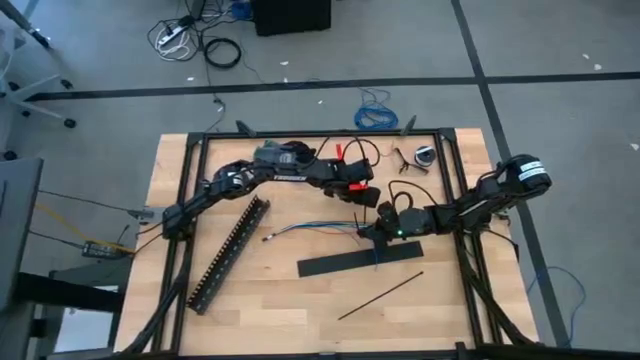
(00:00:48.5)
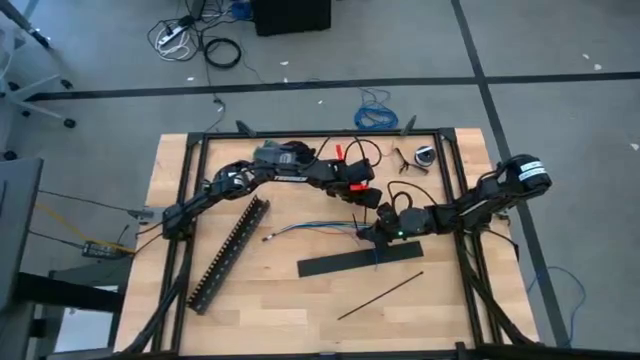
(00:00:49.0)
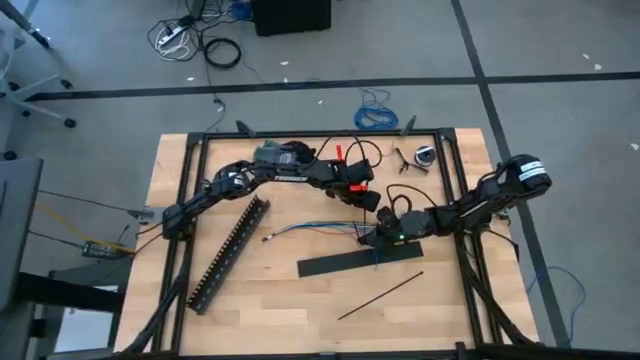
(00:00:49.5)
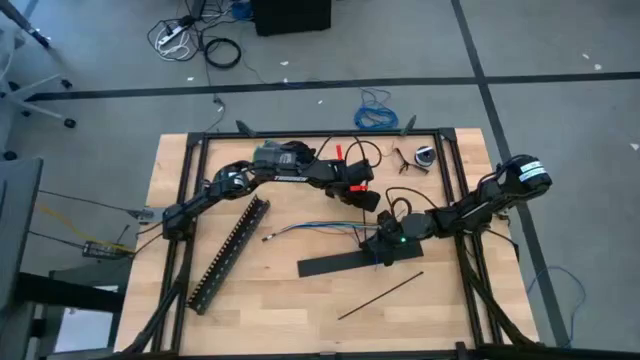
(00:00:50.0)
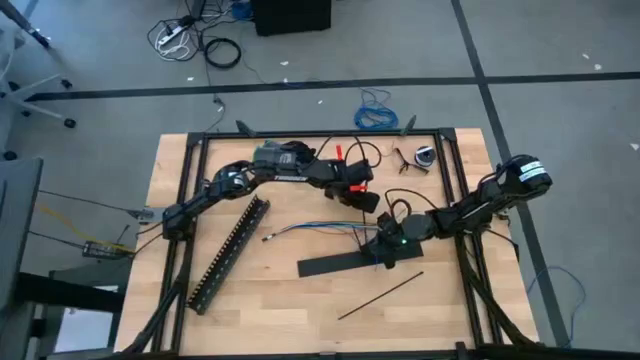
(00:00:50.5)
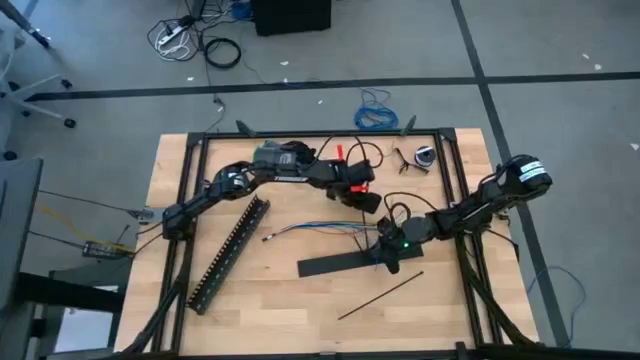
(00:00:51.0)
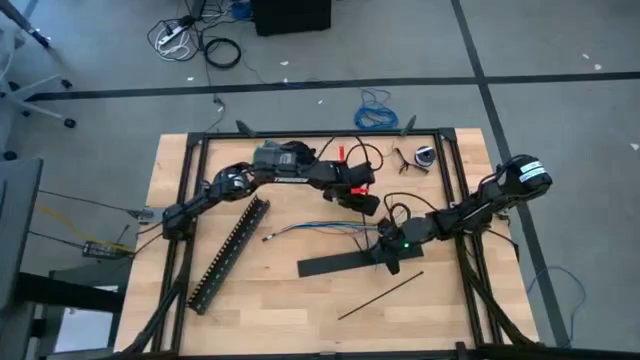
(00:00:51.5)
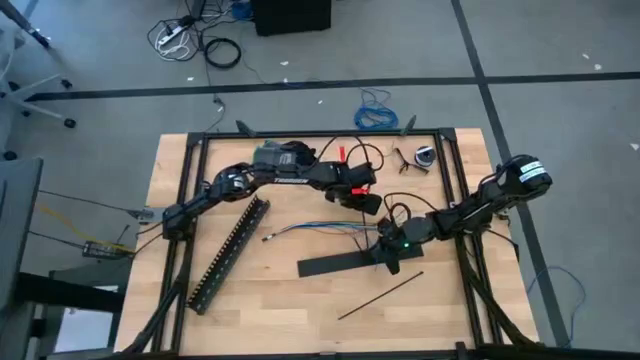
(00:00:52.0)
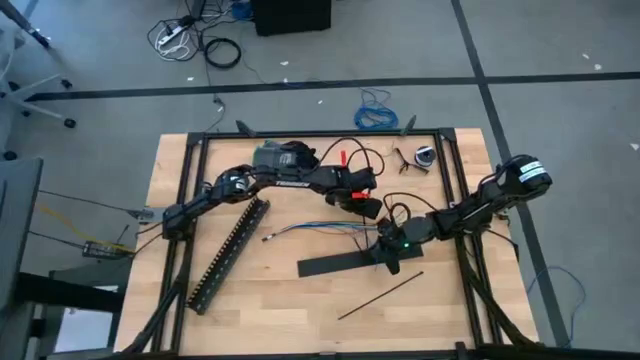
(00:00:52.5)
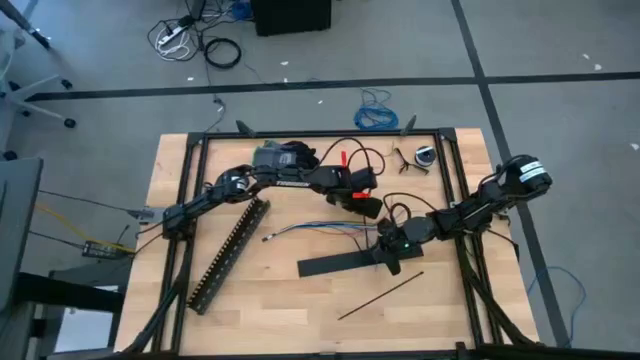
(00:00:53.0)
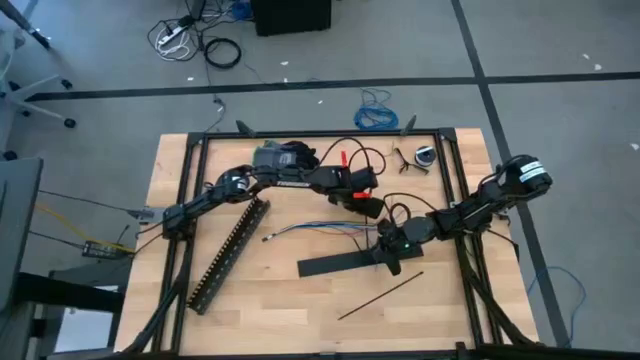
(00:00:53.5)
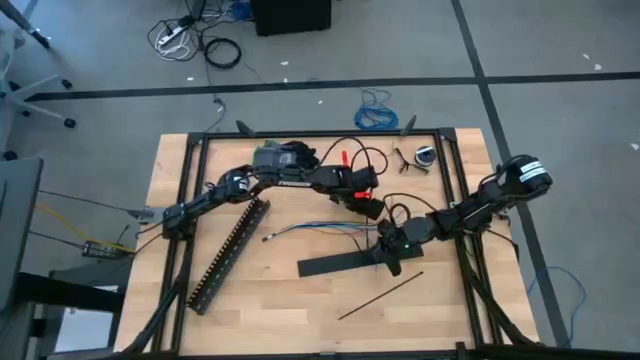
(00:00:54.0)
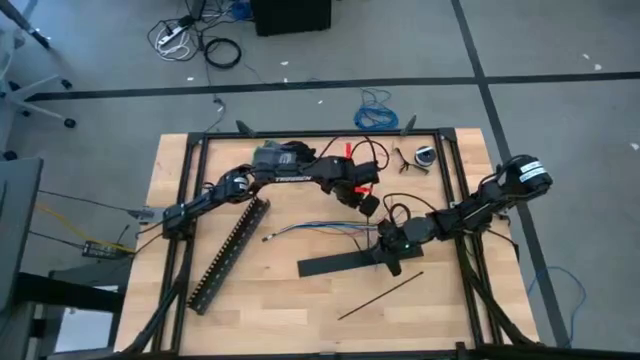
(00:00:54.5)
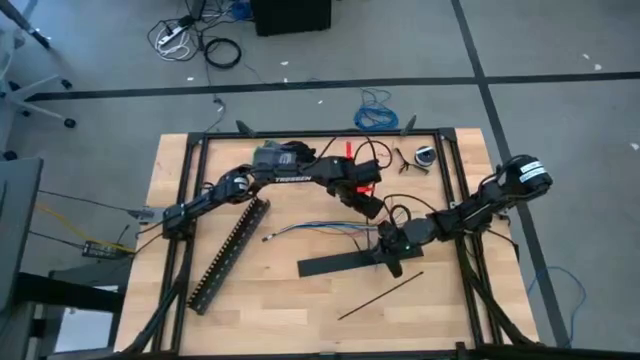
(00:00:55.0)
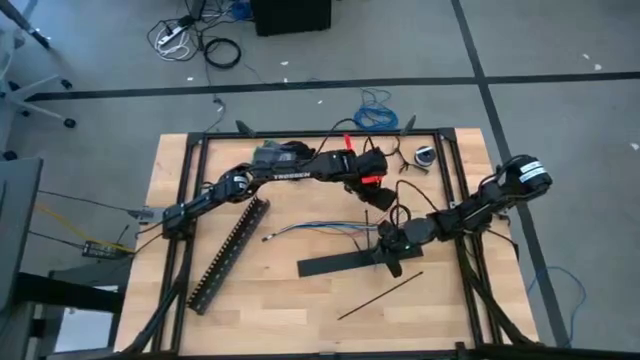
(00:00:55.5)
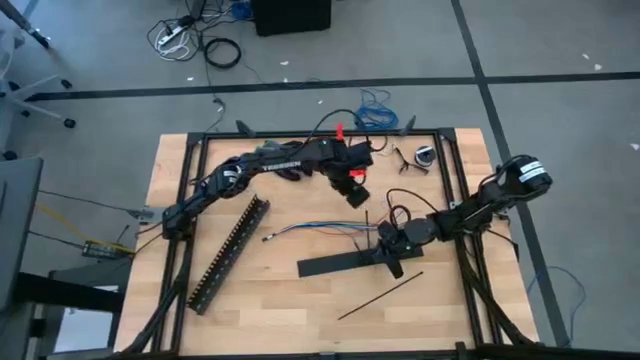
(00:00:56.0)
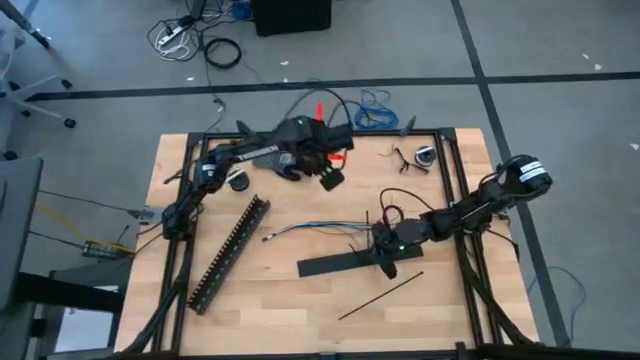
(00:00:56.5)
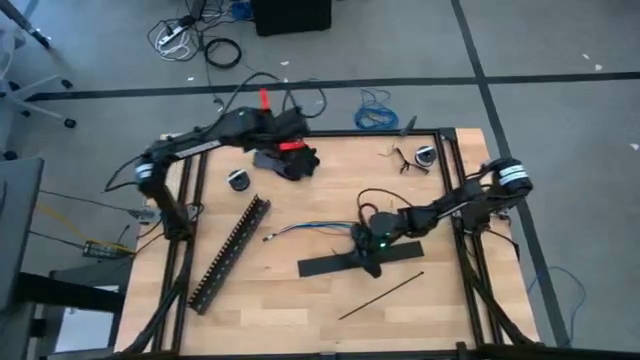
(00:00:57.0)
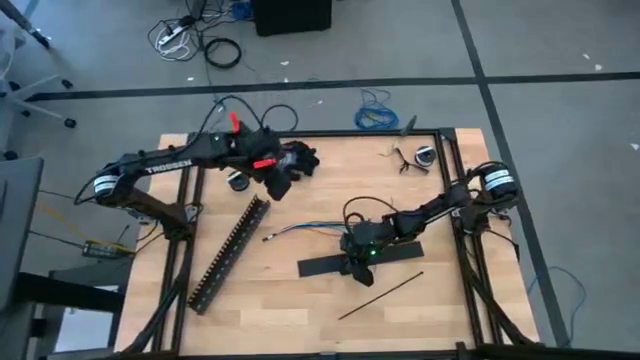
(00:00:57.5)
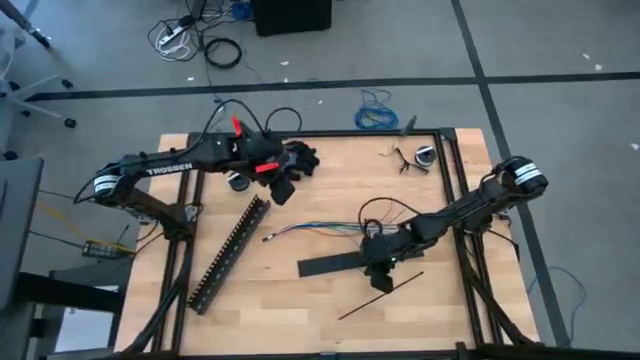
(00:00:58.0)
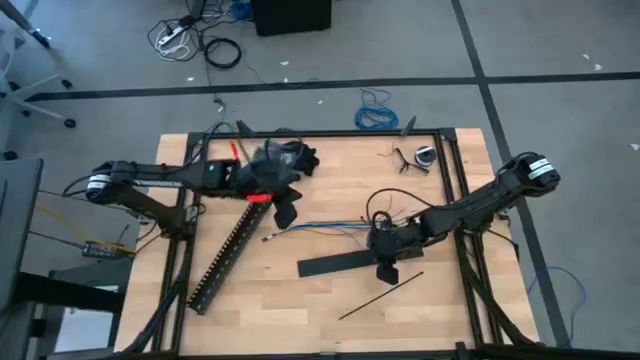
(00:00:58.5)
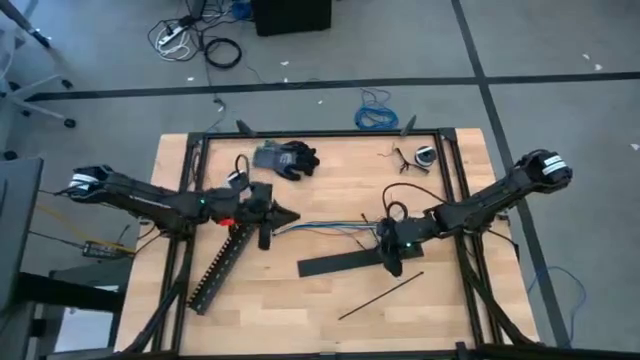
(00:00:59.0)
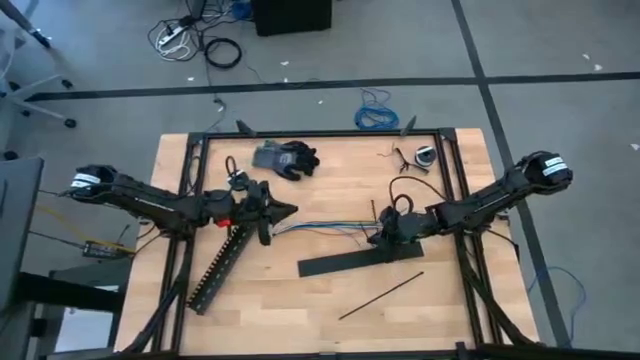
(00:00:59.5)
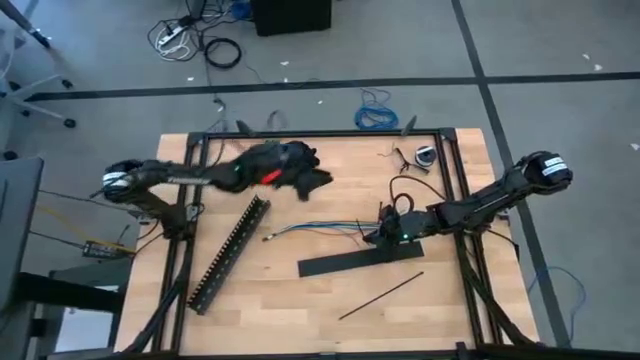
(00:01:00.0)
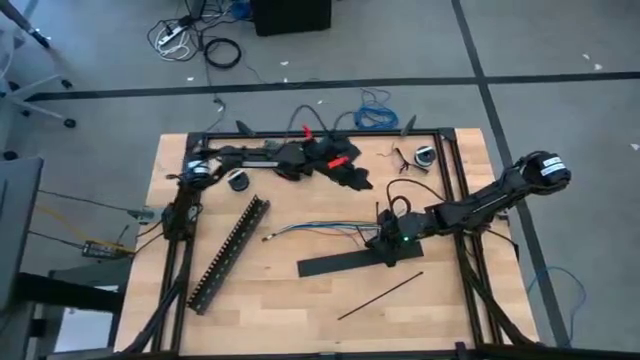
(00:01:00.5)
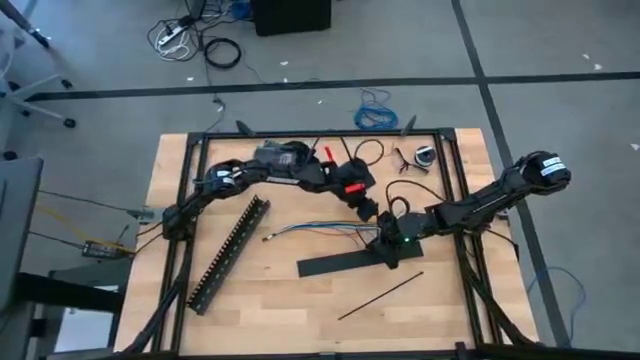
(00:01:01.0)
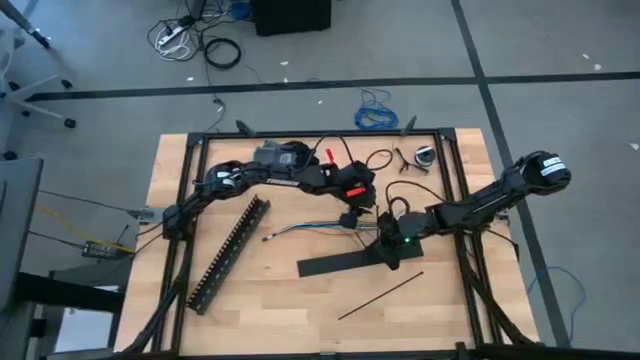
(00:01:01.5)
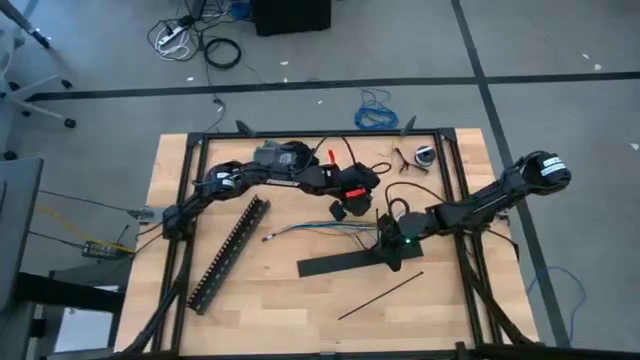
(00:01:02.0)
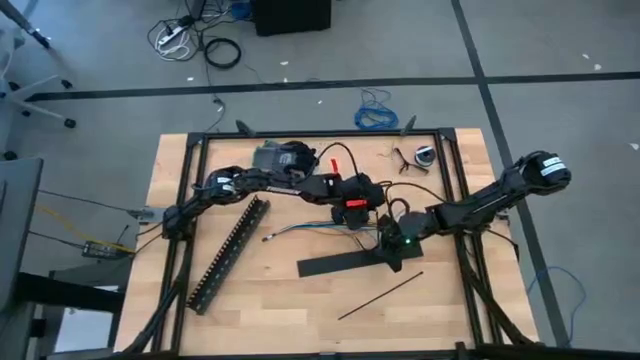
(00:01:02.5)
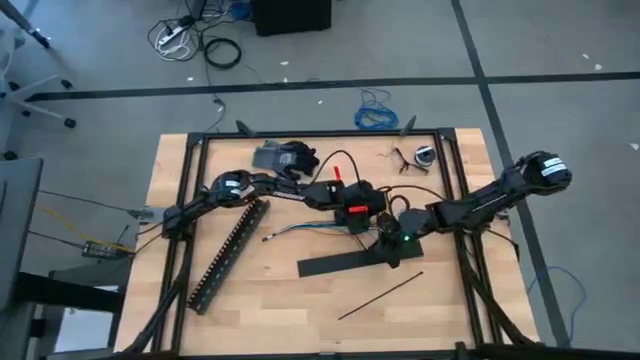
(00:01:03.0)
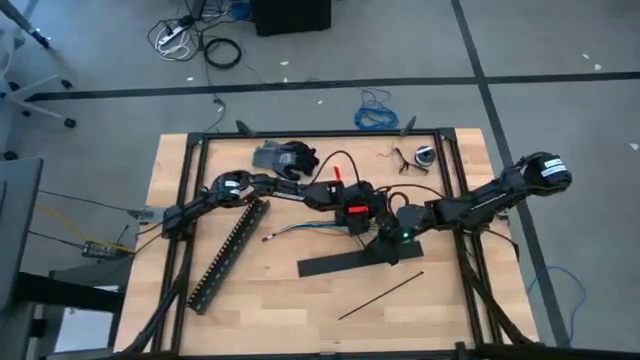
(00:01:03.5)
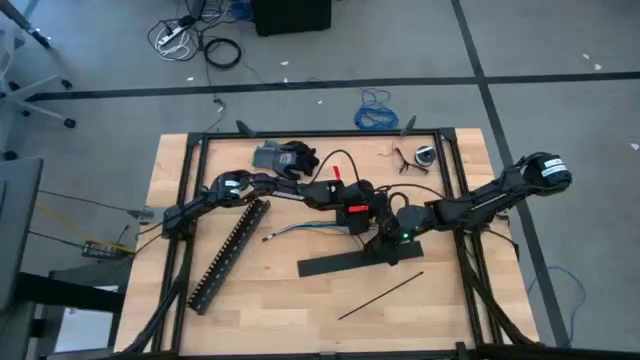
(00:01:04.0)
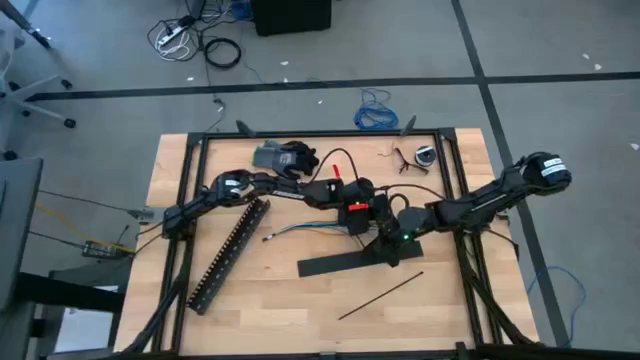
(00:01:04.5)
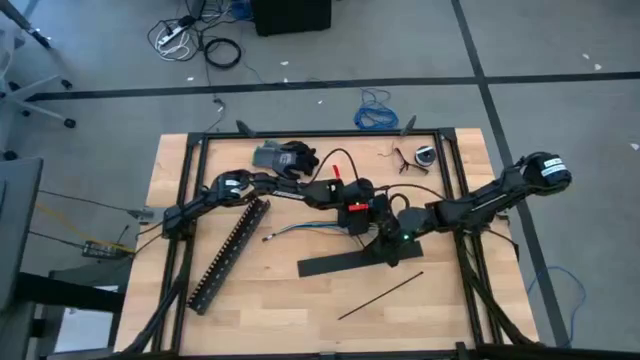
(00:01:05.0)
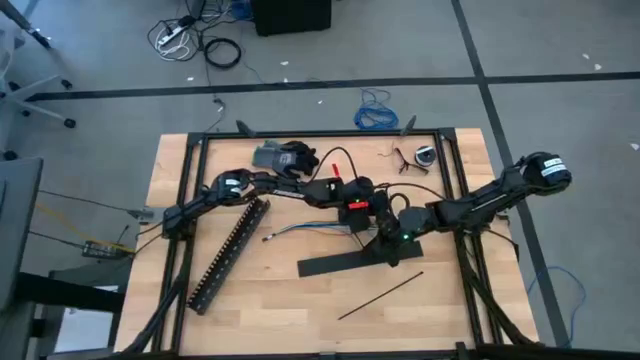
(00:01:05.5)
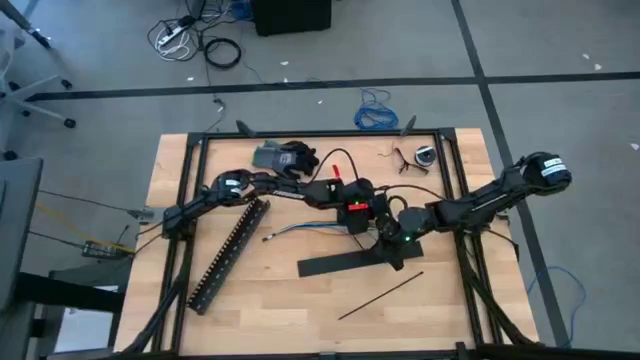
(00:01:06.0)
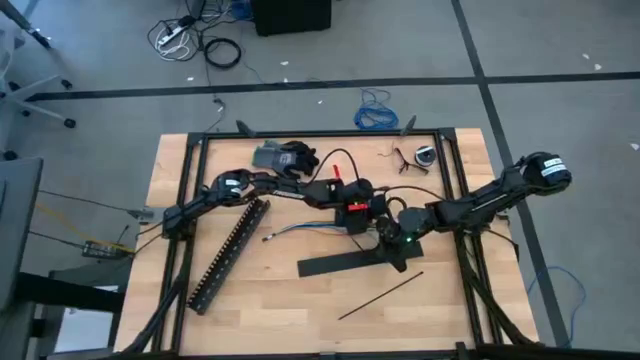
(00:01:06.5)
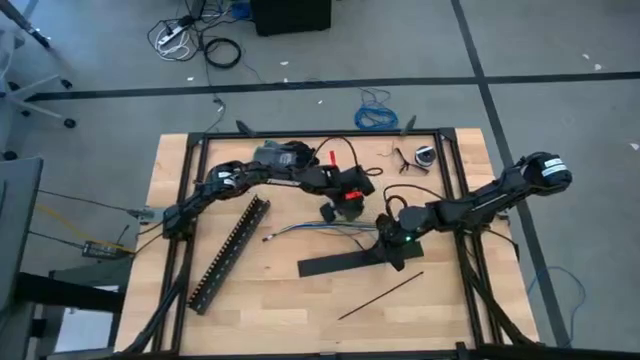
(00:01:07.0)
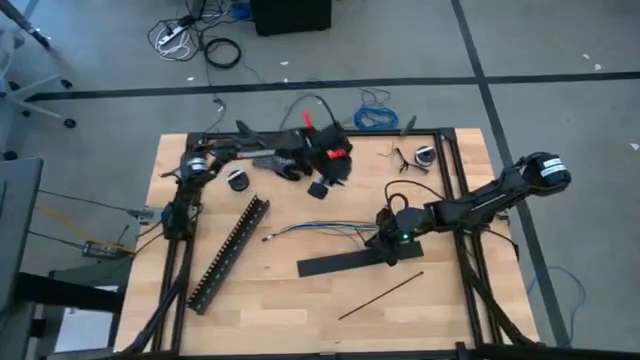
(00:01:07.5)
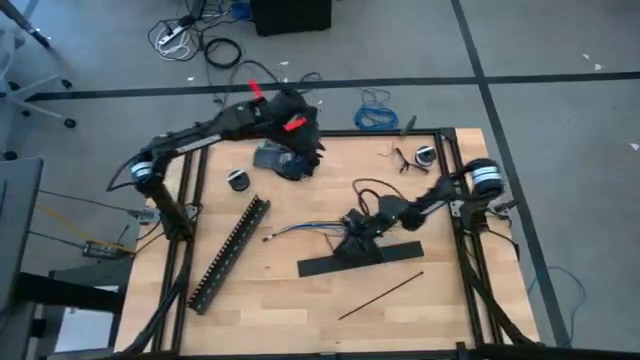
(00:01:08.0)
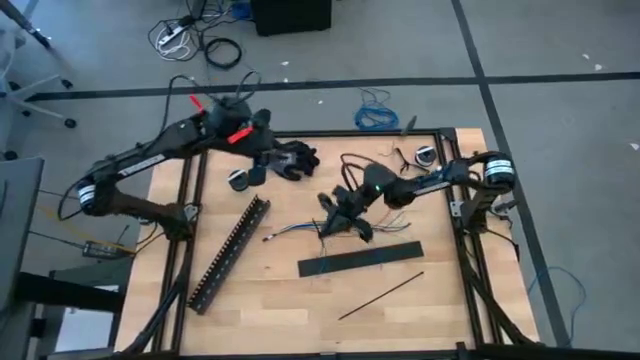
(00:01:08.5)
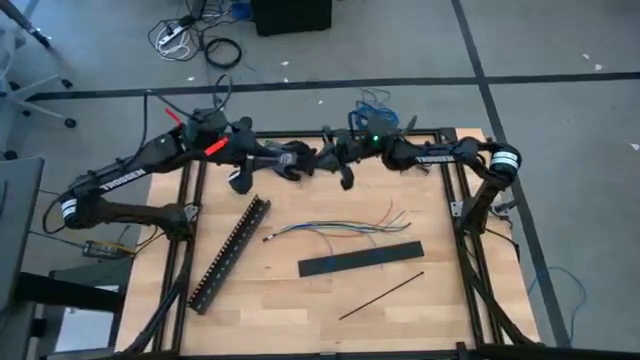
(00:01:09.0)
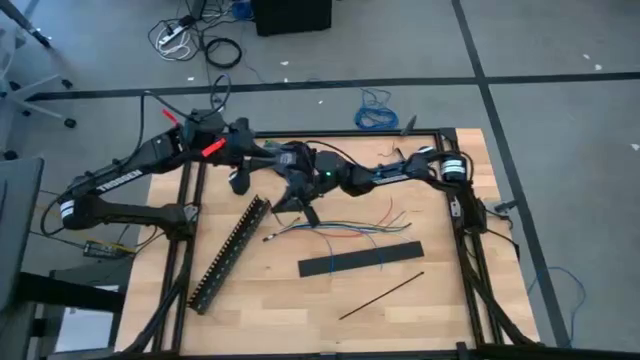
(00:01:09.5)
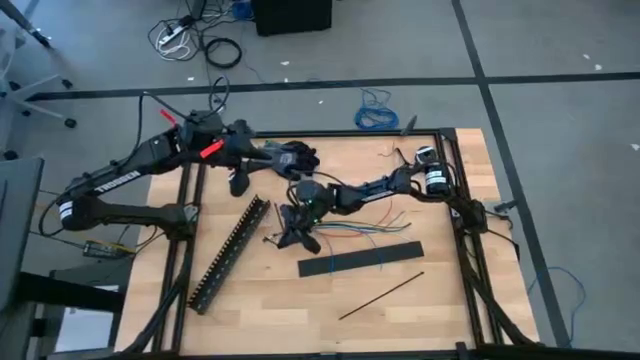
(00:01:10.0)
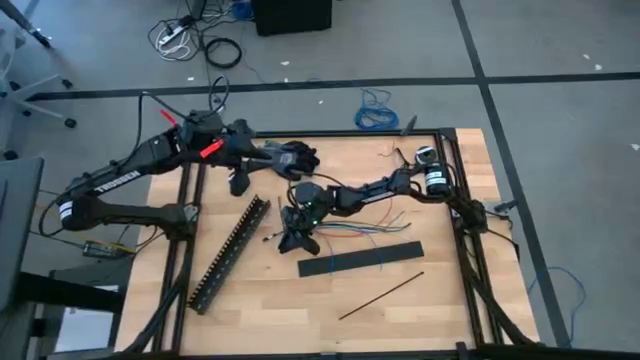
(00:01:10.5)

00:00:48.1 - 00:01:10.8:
Task: Ziptie cables
Wrap the black zip tie on the cable wires
